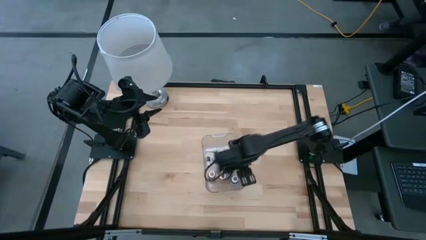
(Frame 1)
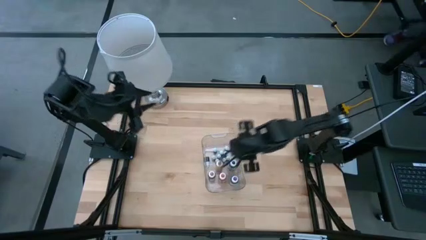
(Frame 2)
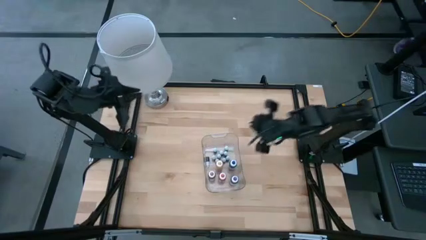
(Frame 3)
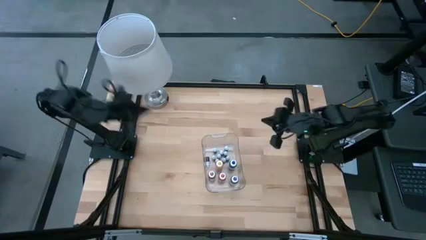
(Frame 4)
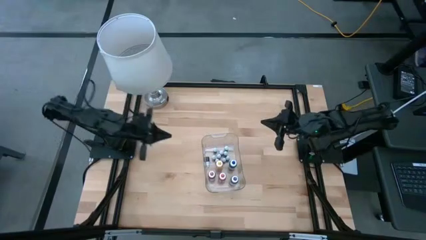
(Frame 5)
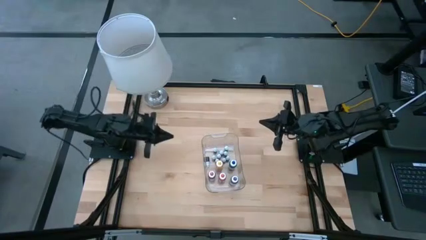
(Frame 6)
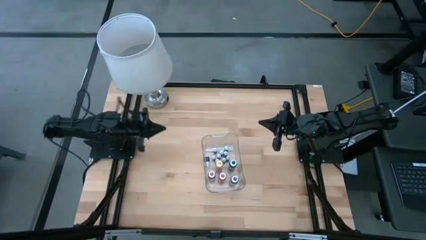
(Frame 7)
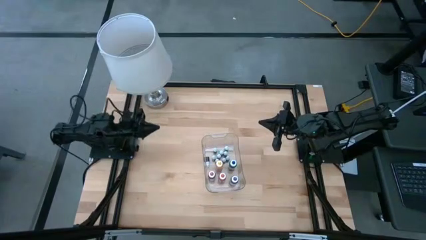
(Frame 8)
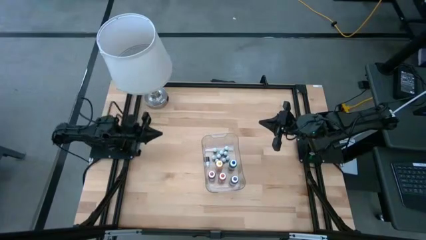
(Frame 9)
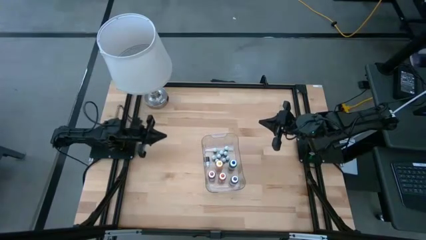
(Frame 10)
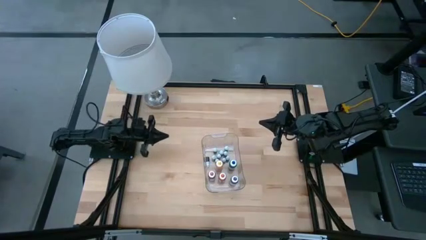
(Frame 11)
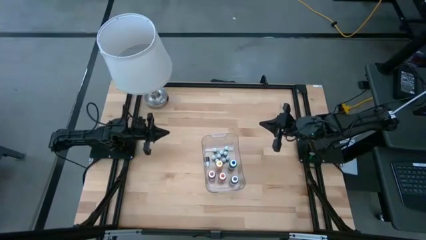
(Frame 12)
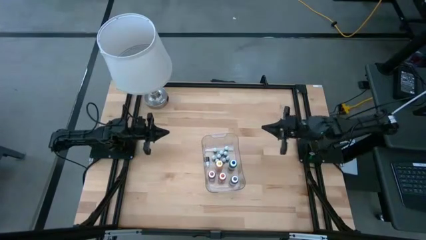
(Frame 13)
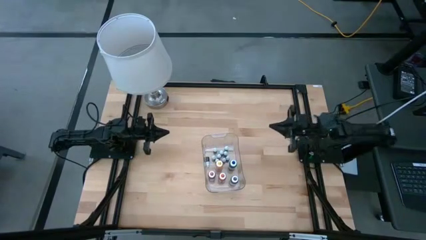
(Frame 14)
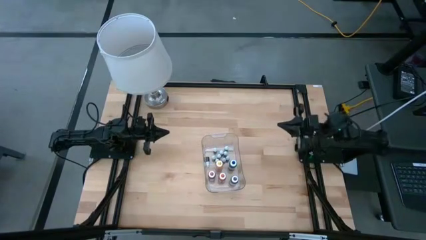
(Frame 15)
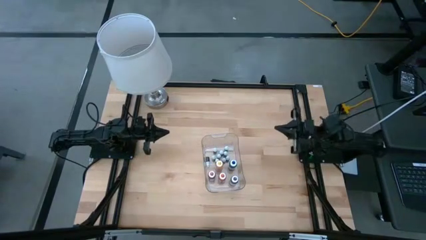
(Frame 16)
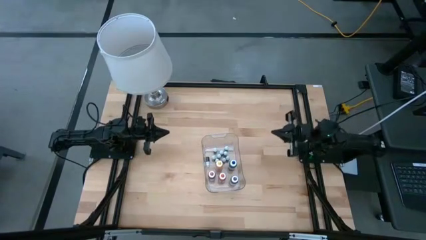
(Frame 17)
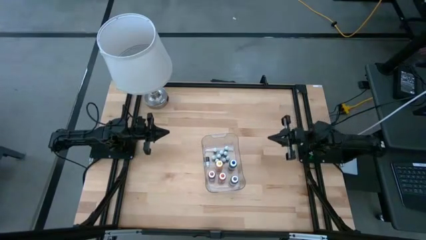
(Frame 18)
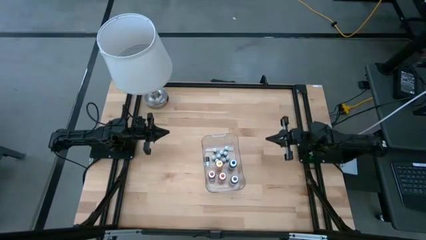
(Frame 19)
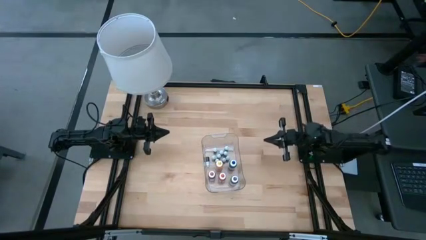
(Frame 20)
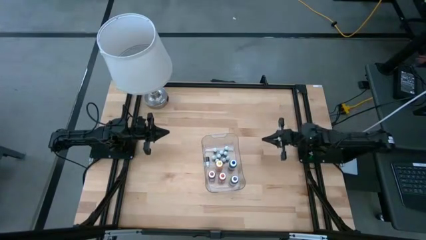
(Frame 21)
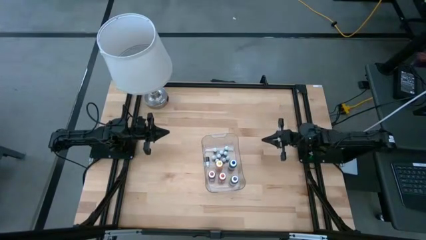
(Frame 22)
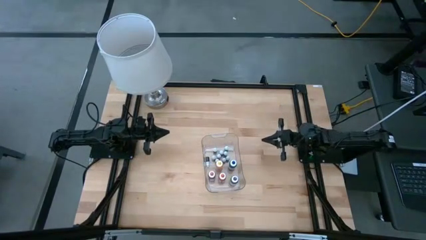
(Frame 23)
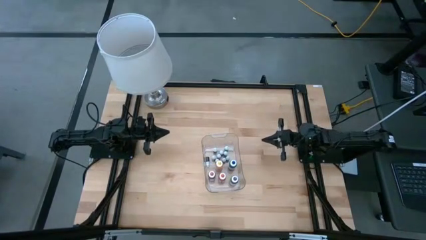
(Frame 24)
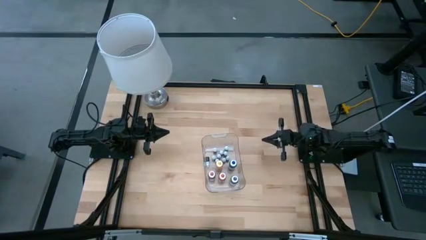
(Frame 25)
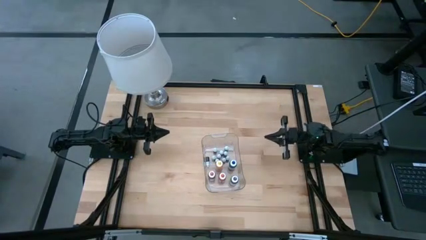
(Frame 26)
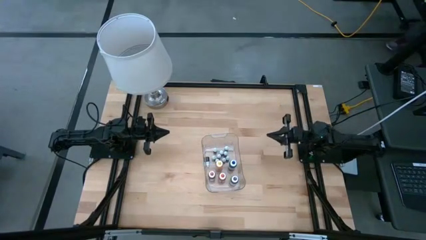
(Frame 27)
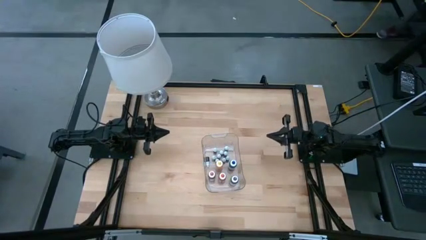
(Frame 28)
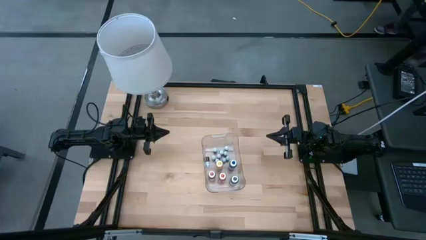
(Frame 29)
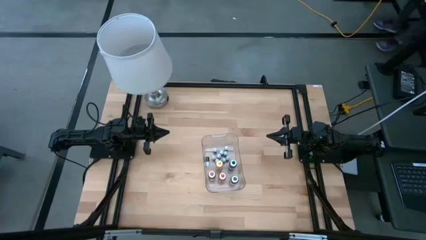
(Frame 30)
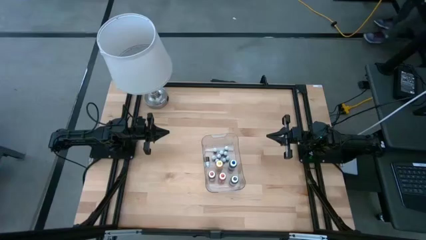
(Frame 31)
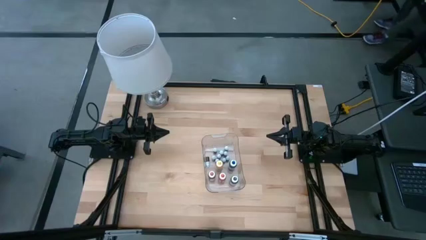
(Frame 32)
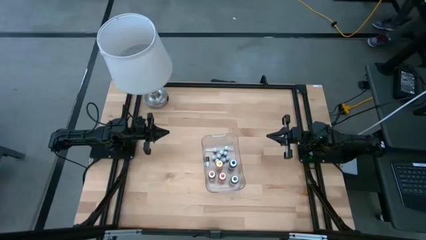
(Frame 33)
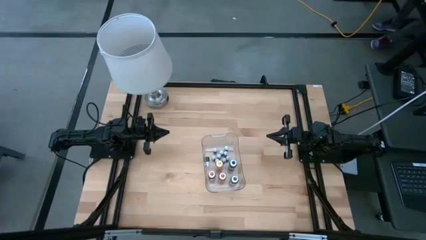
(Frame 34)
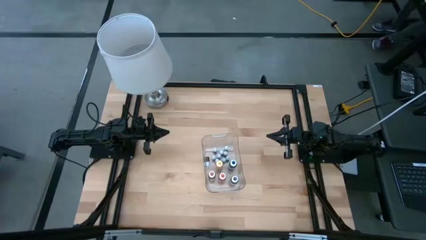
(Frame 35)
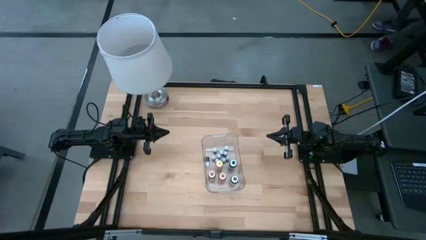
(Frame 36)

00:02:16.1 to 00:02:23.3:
Task: Pick & Place food coloring
Return to Home Position

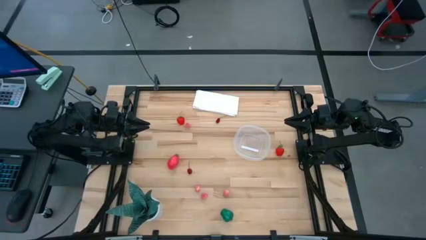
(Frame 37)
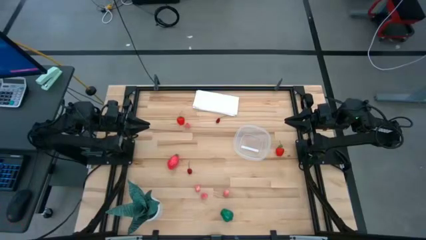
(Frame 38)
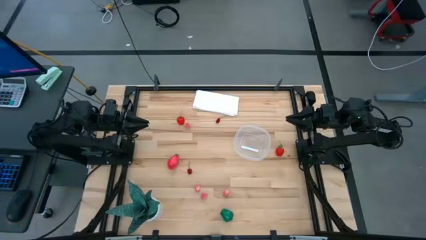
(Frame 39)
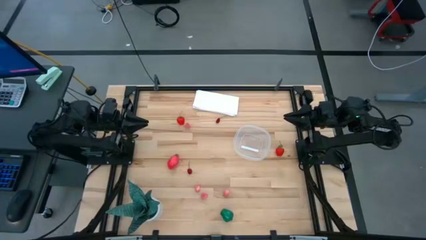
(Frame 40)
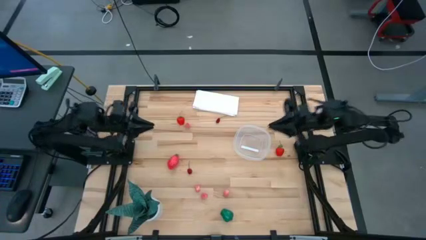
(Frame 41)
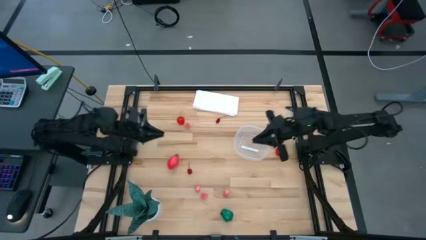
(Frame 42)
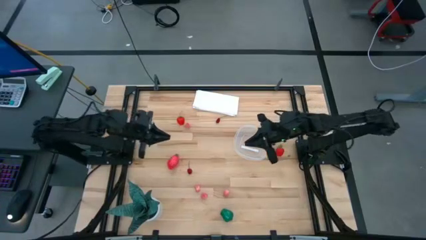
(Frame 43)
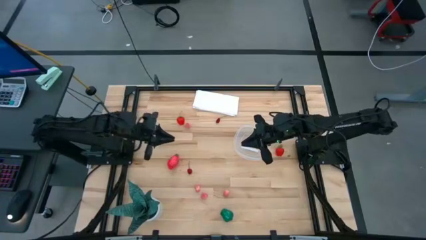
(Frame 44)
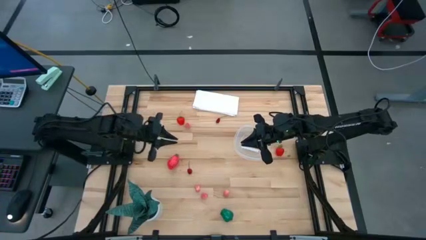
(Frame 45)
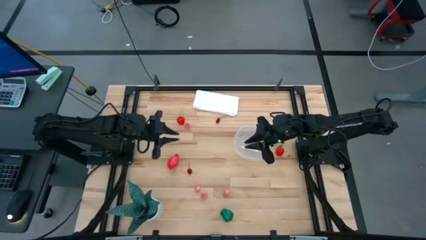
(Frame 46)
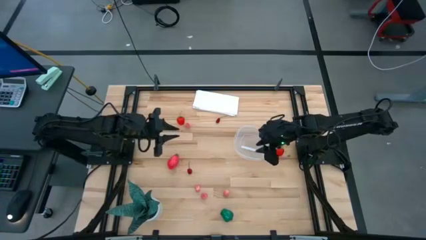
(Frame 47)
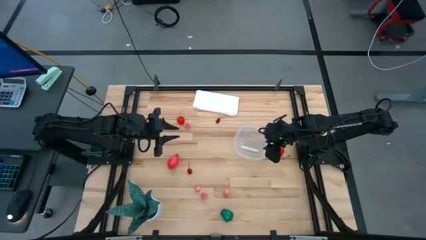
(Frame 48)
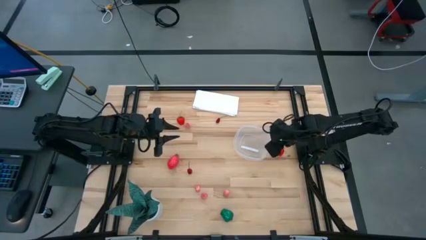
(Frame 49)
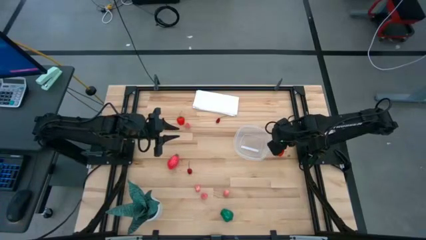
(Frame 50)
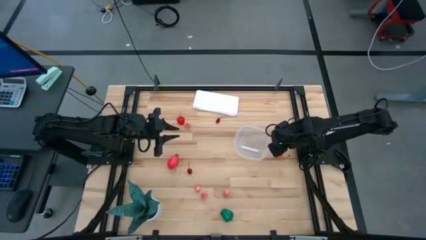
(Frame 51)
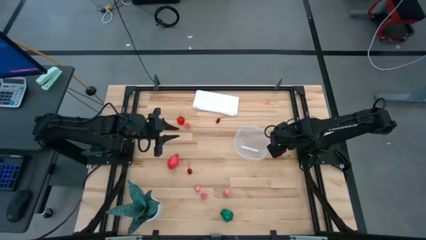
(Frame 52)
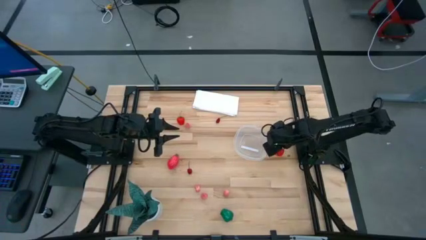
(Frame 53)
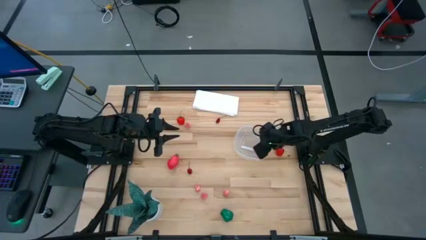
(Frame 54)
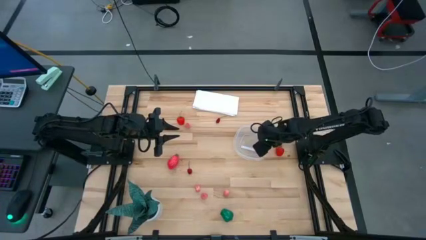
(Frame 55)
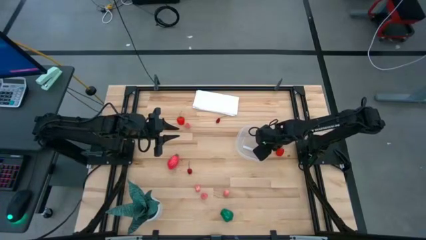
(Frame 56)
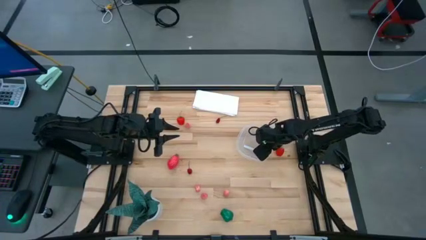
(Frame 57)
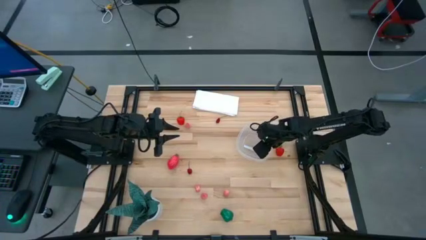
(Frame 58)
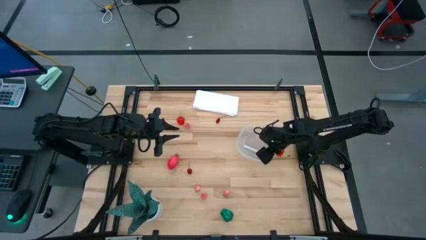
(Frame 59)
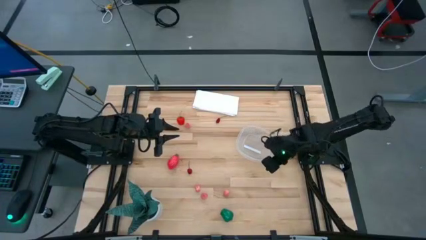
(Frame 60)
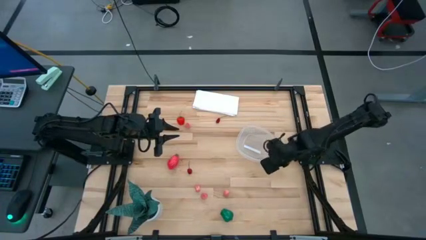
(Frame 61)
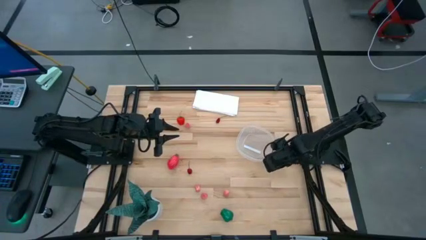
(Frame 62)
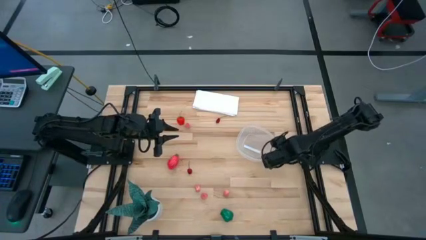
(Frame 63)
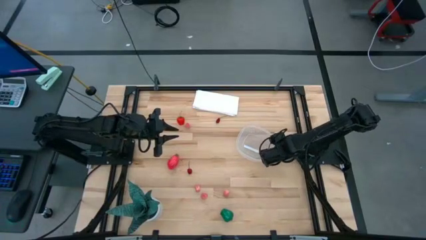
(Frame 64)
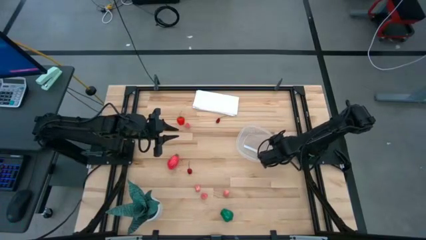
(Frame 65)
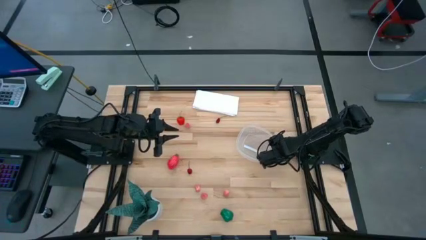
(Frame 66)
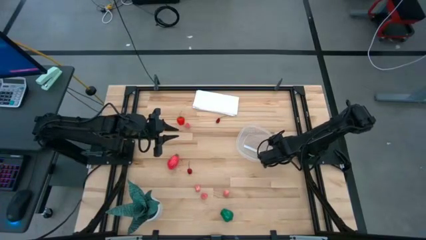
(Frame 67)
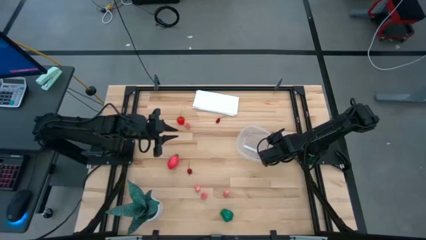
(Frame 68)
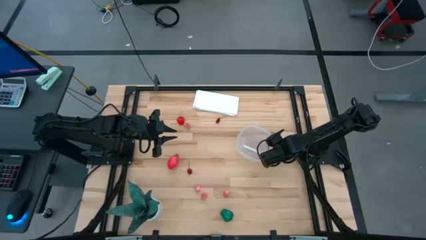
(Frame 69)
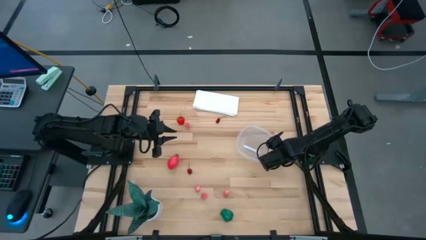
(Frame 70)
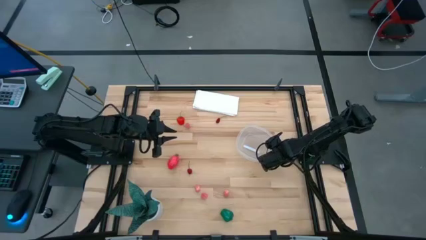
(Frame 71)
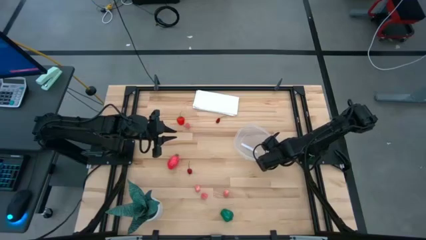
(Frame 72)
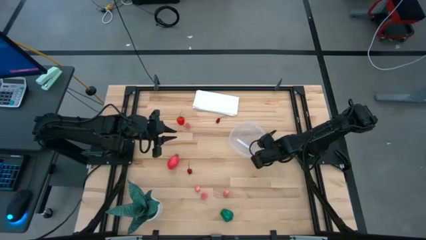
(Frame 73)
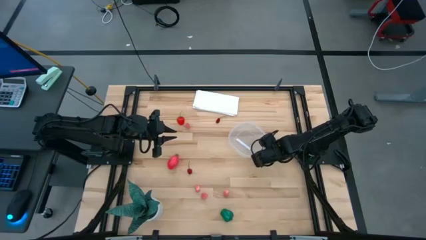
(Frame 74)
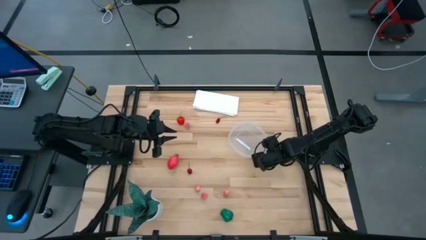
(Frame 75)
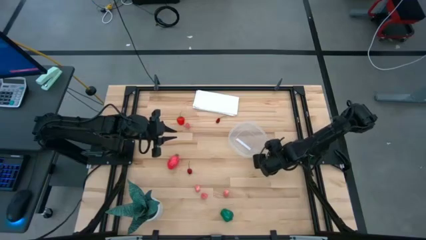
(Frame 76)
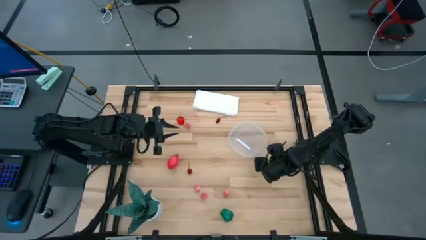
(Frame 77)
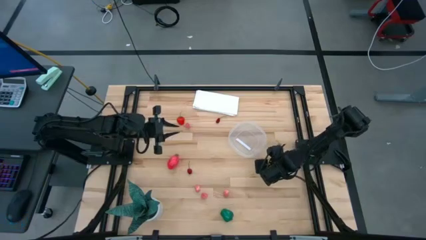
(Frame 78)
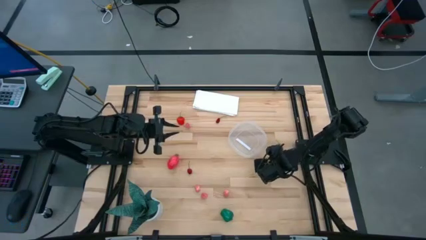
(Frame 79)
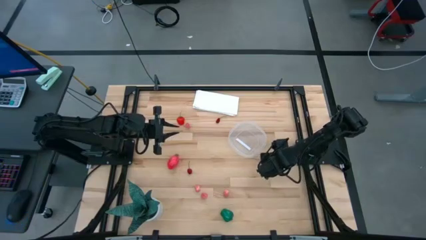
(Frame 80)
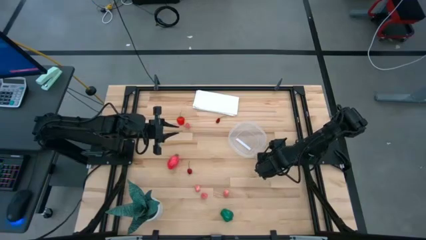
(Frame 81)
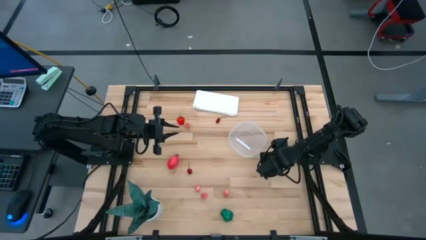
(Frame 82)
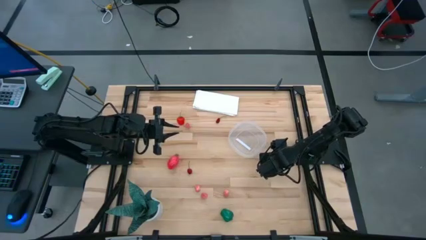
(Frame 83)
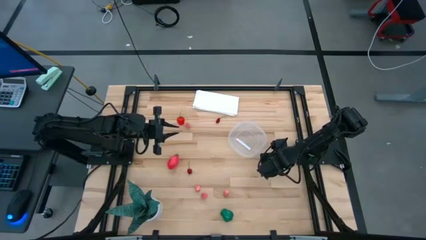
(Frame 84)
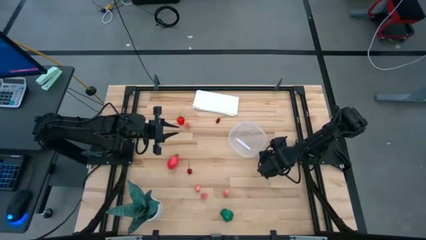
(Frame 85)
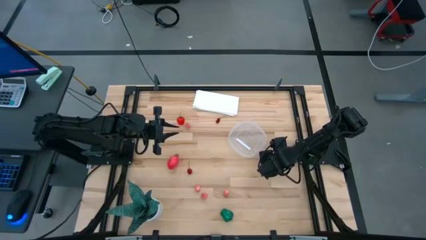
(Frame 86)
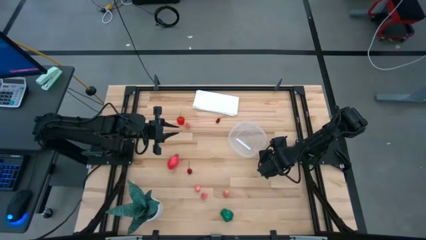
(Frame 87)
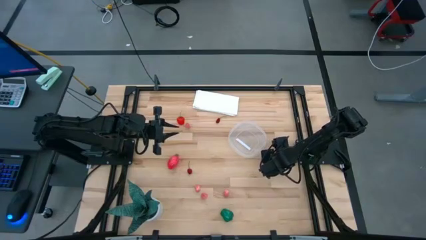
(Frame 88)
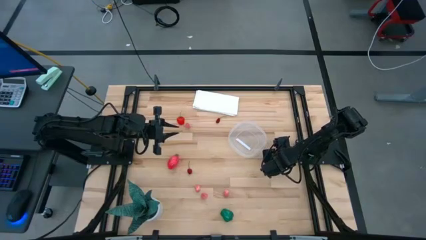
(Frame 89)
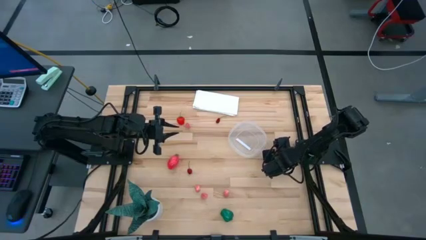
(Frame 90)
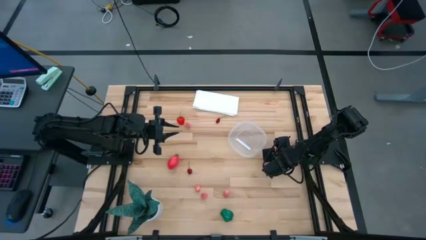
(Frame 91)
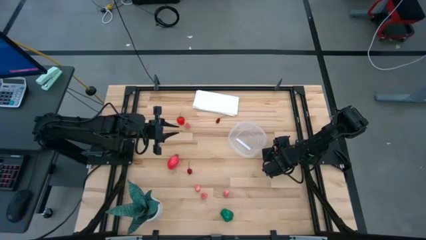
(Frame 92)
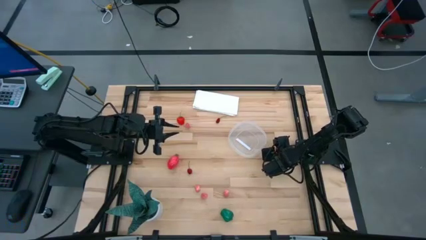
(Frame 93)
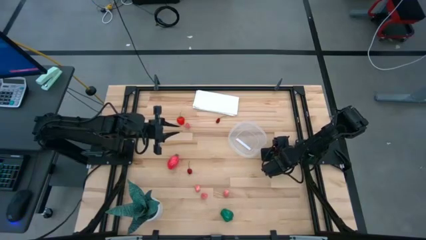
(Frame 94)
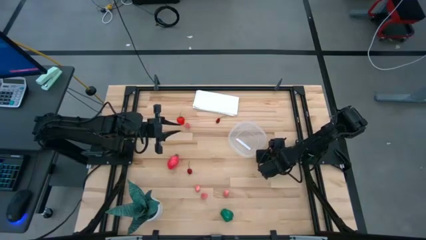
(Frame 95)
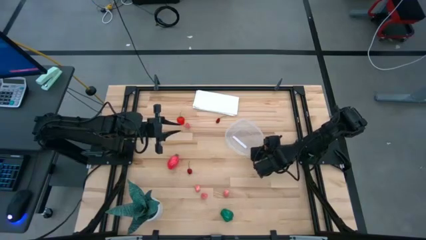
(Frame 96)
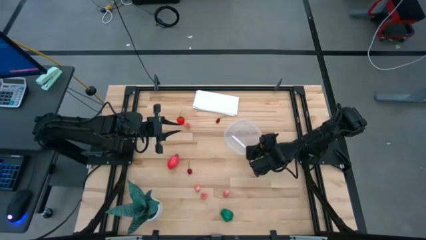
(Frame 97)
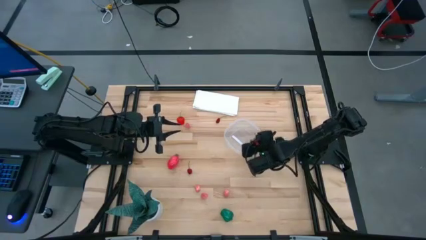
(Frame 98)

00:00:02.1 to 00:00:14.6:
Task: Pick and placing Produce into tupperware
Put the right red strawberry into the transparent bin
